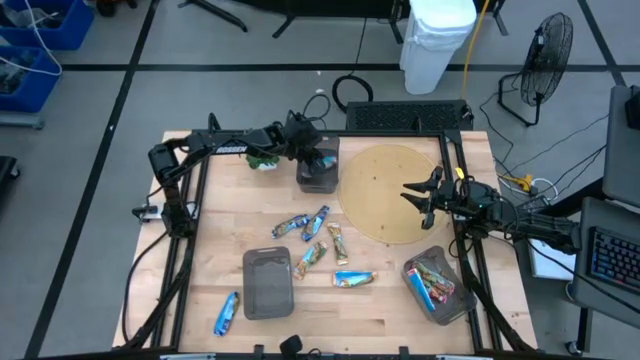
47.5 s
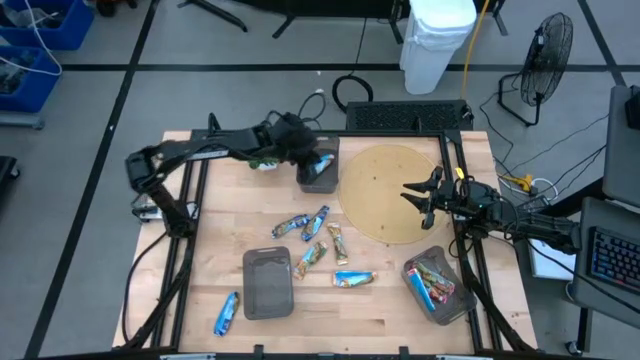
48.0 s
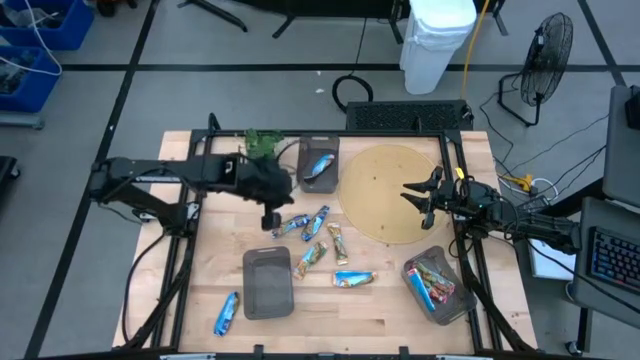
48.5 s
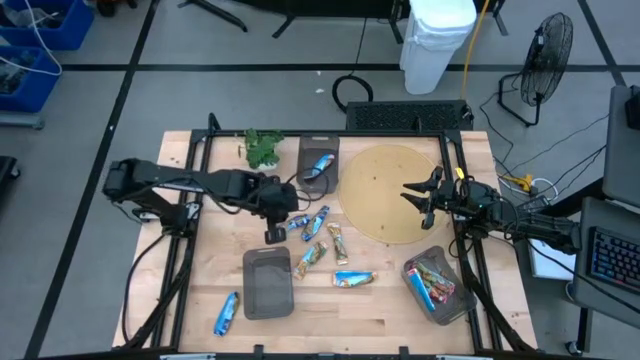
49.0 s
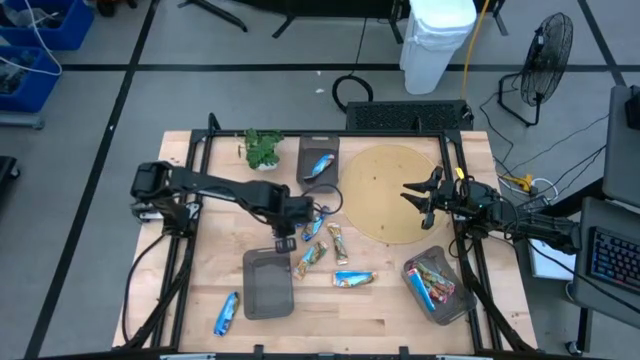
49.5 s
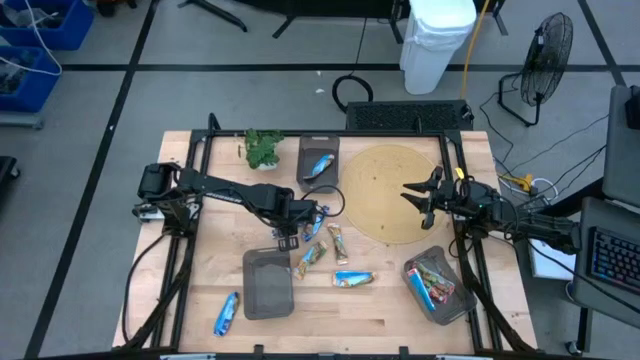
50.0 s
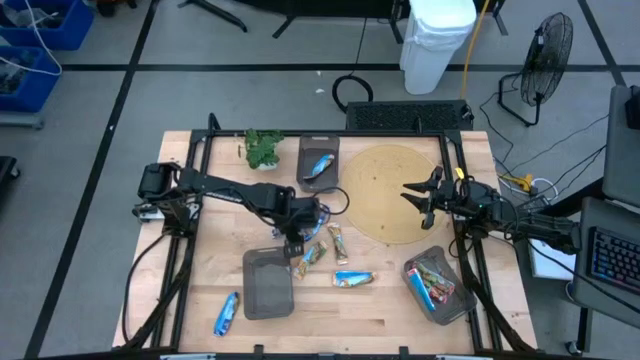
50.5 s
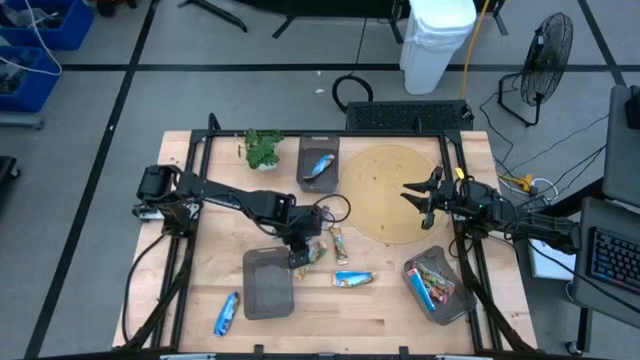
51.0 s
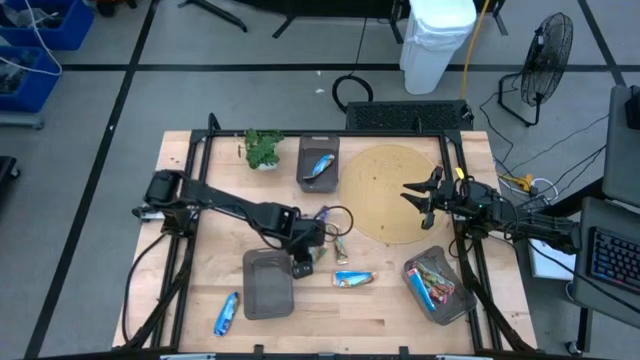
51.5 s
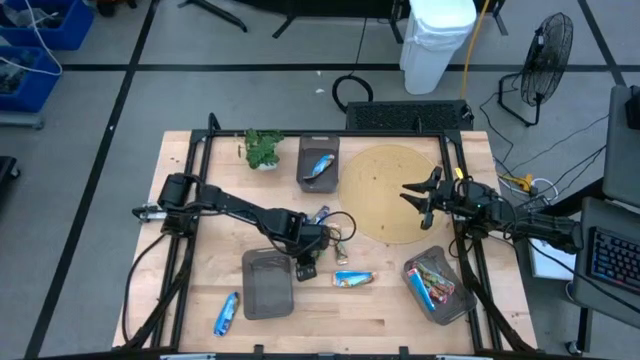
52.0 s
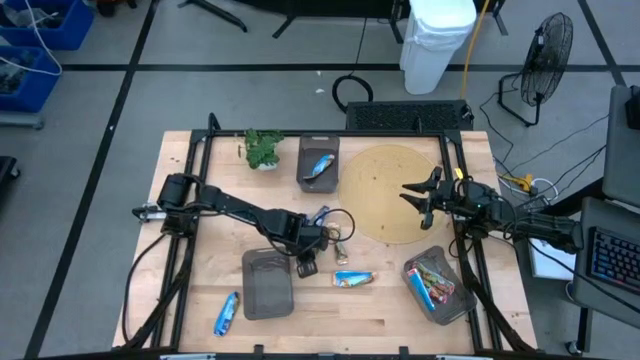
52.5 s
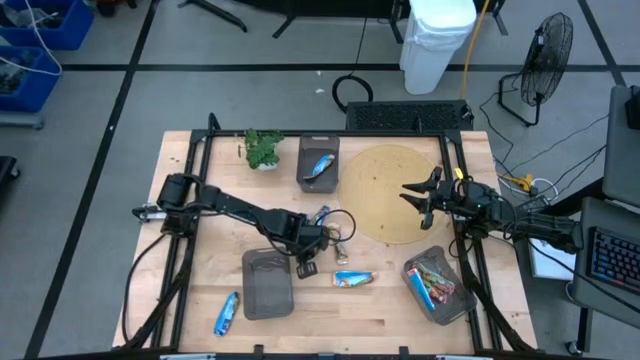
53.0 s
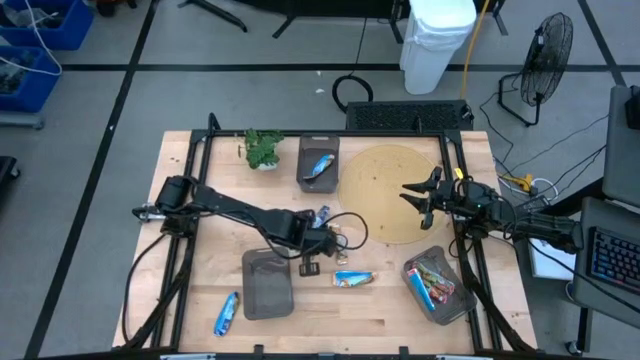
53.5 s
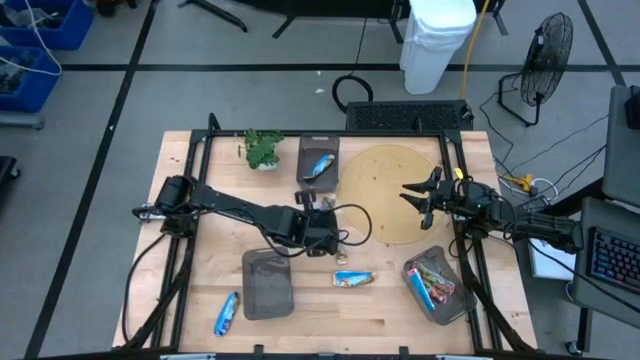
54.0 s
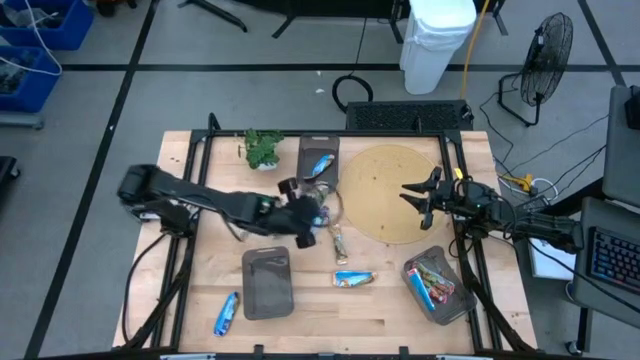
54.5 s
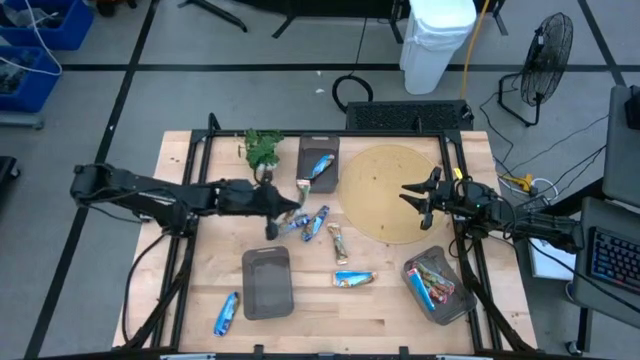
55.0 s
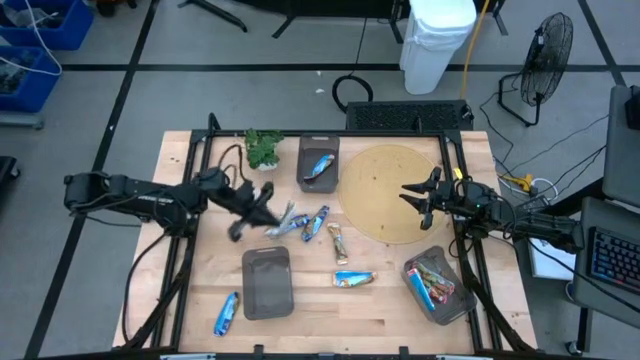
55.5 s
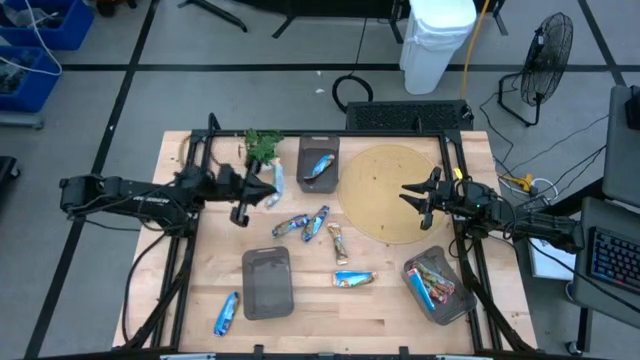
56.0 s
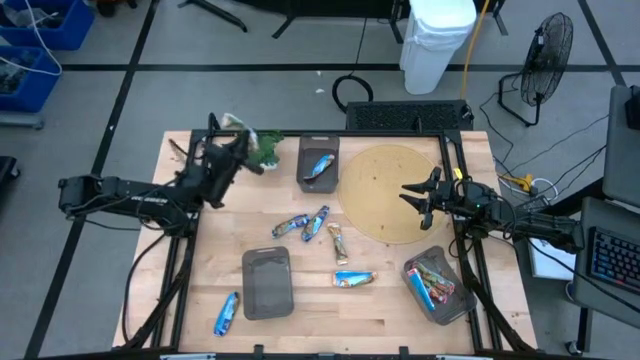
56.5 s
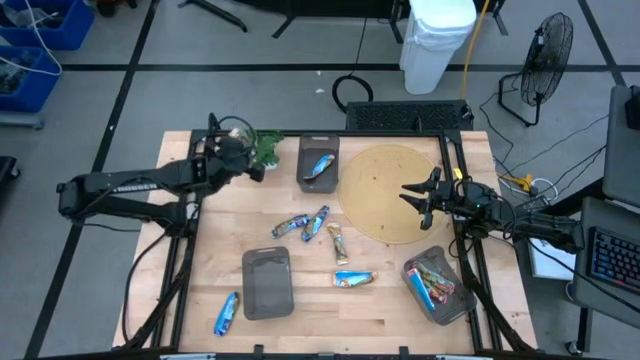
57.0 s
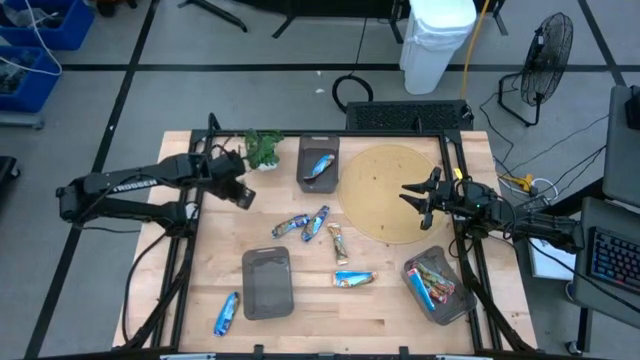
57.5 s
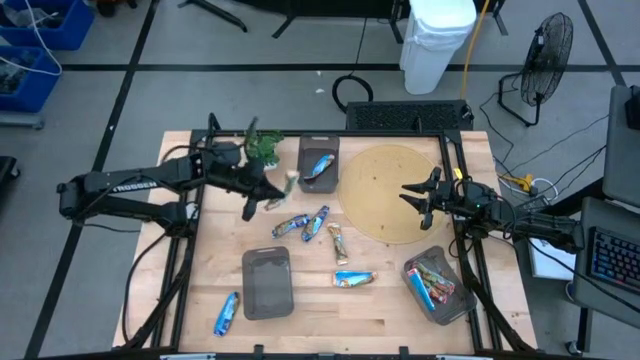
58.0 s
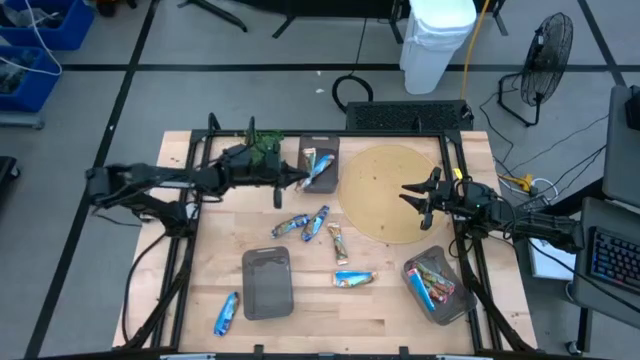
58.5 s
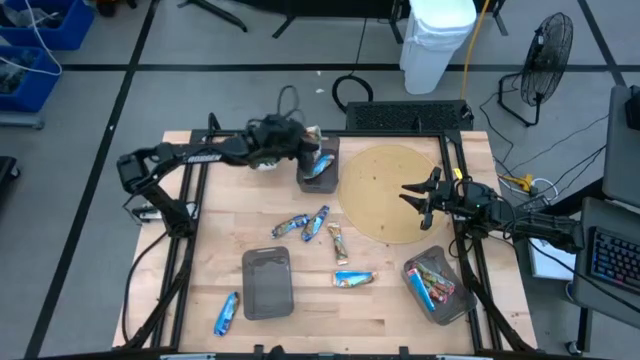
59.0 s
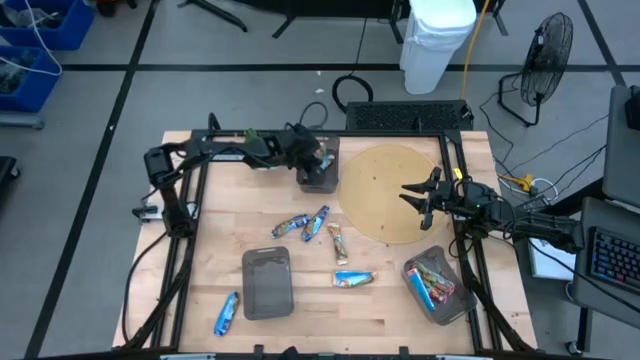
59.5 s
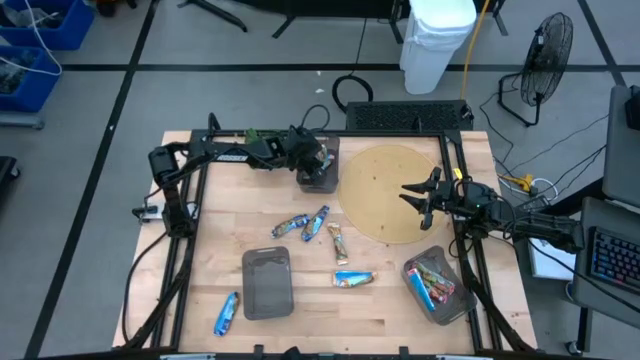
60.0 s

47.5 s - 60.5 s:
Task: Pick and place Granola Bars by type
Put the yellow granola bar into the top black bin

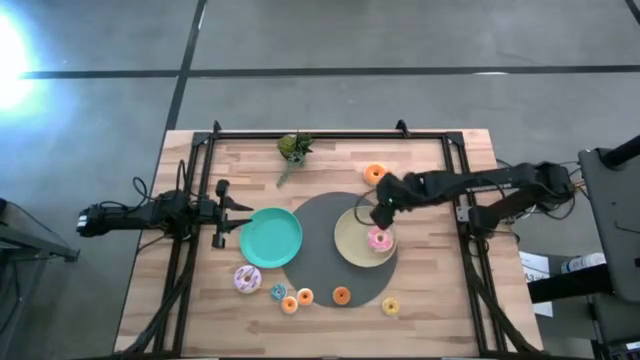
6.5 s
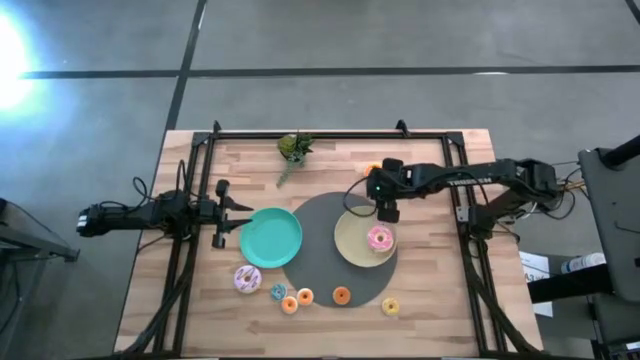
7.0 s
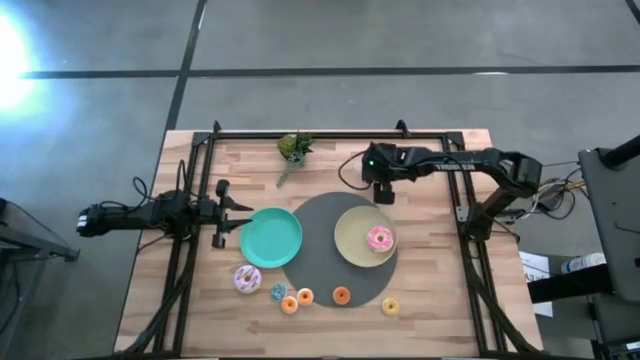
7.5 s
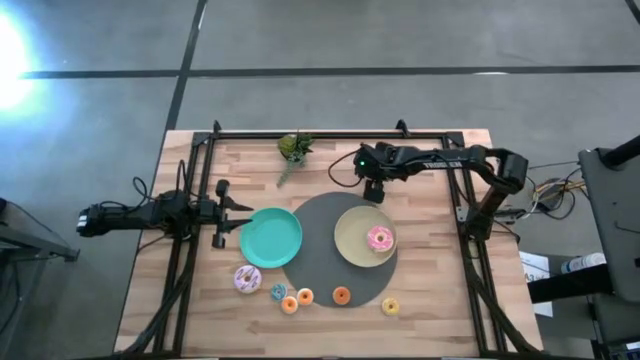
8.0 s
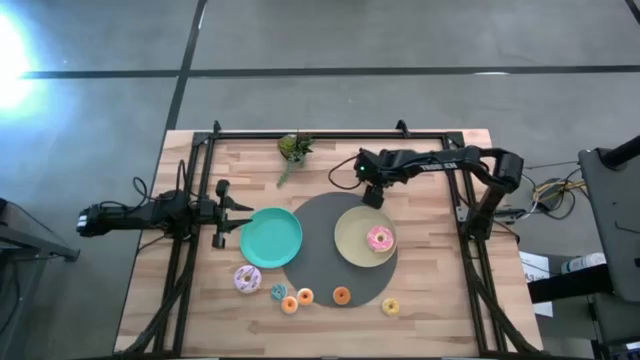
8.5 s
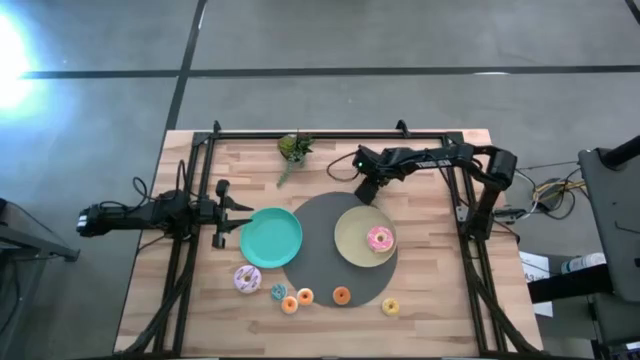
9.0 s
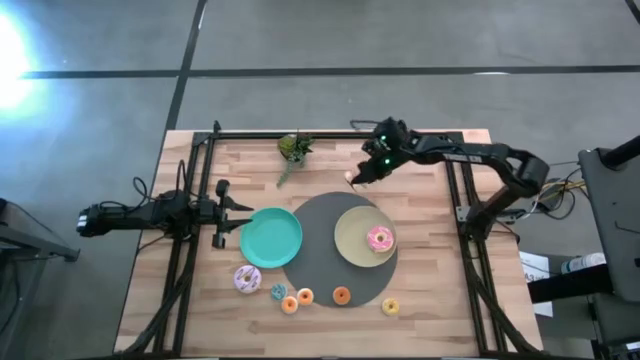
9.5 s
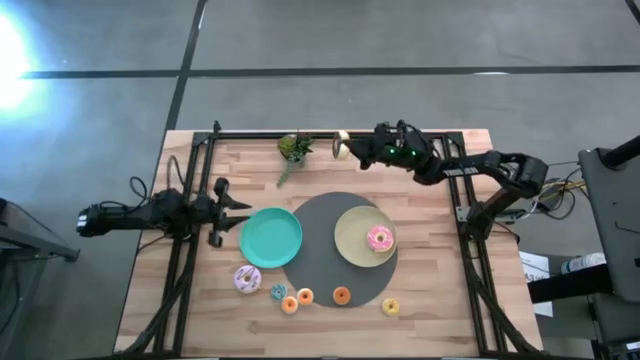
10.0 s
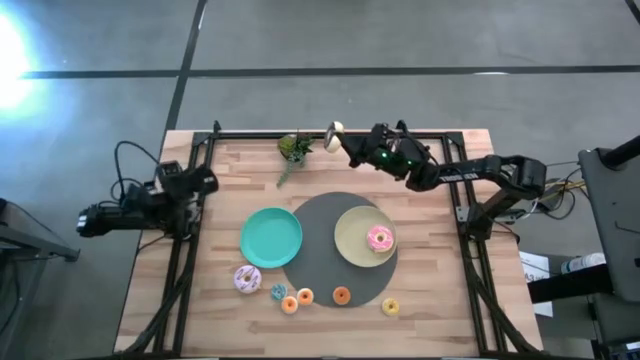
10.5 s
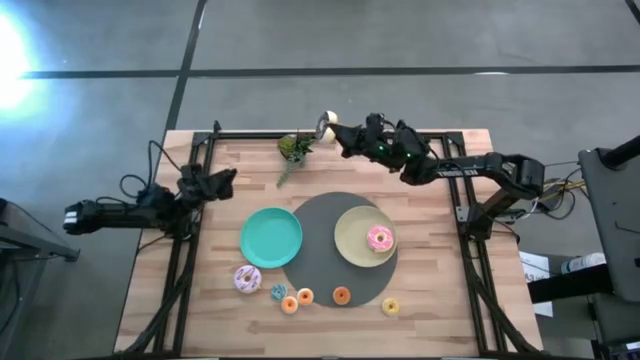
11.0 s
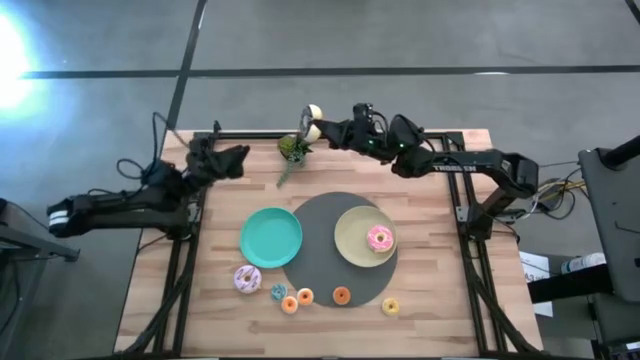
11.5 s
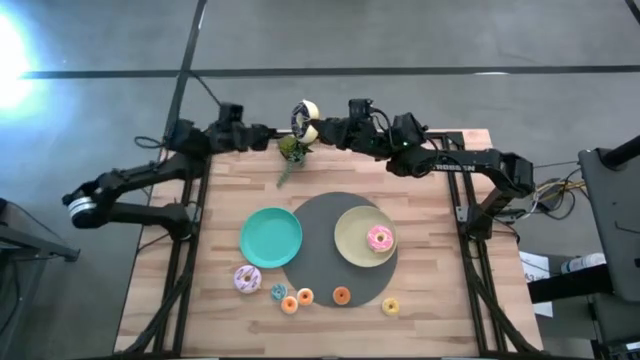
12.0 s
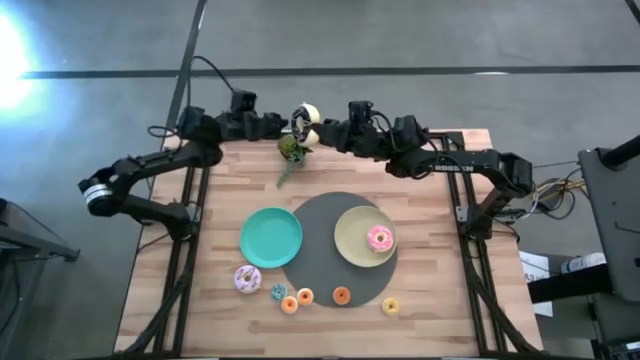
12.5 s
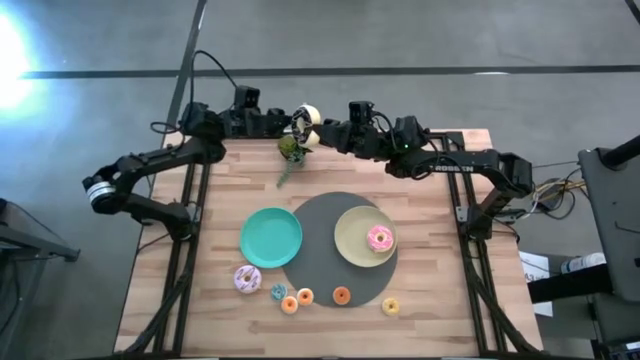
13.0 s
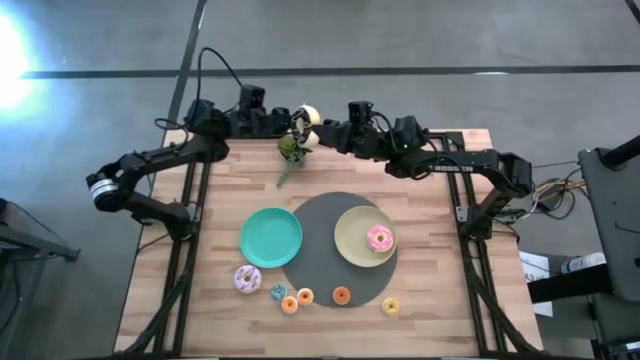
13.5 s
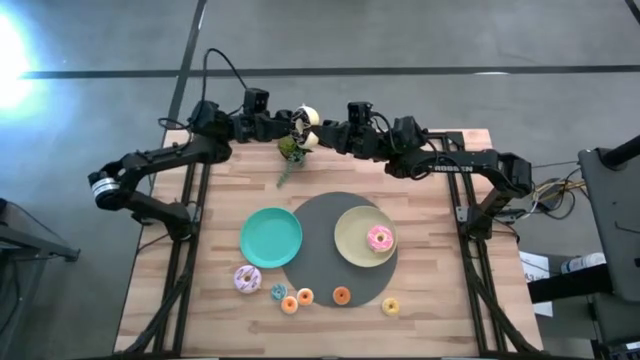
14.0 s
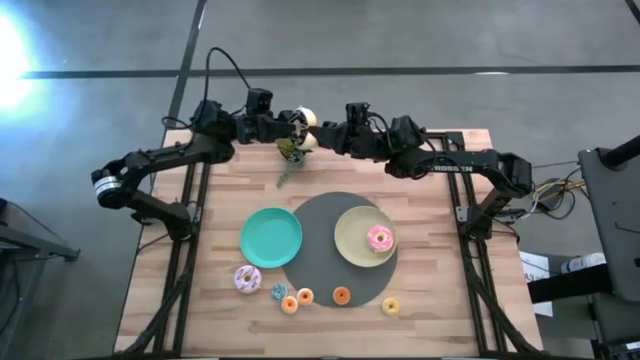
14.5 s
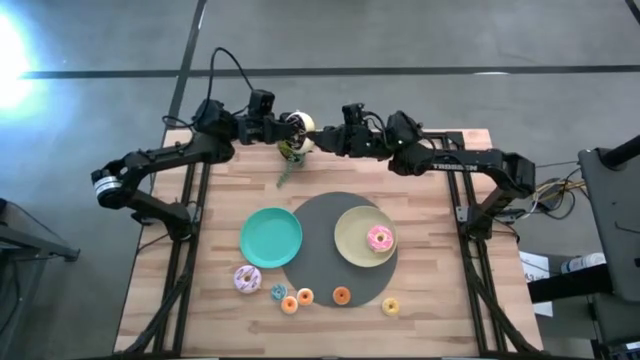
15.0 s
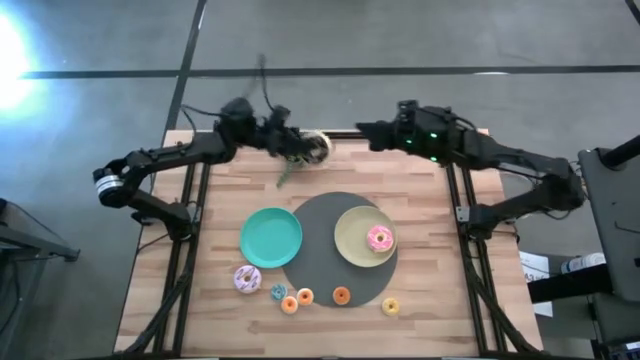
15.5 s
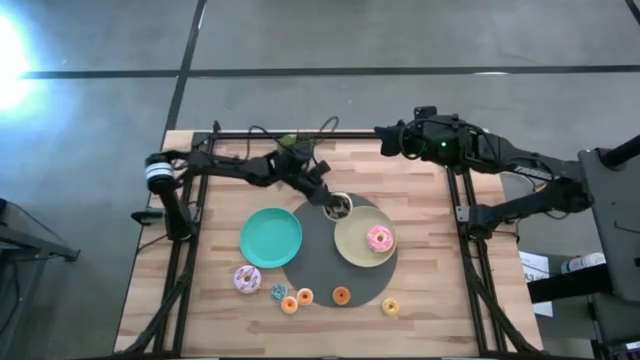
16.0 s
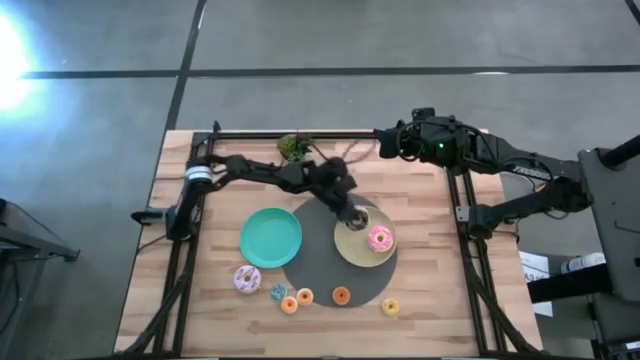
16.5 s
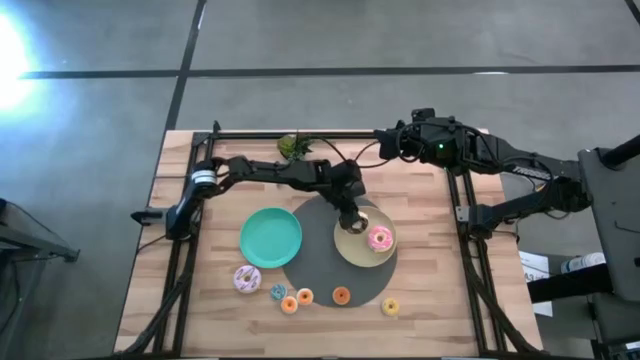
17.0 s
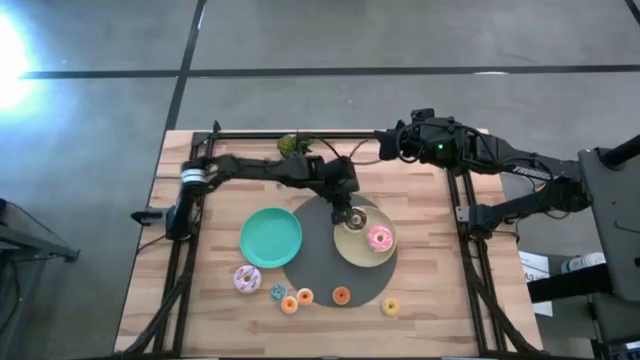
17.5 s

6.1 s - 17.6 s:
Task: Pick & Place donuts
Put the black doughnut on the light brown plate
